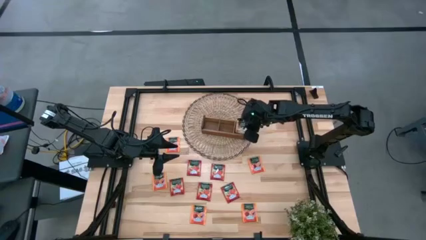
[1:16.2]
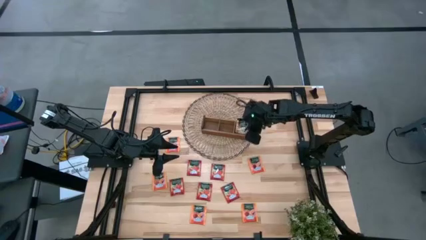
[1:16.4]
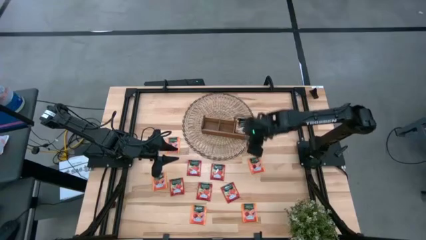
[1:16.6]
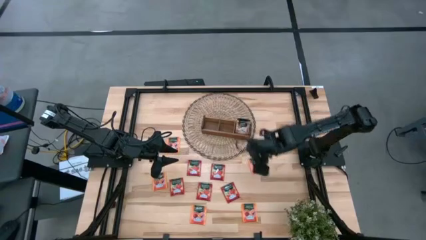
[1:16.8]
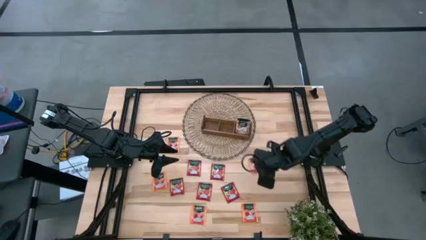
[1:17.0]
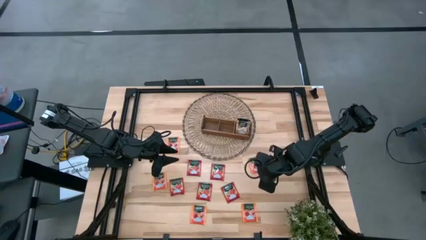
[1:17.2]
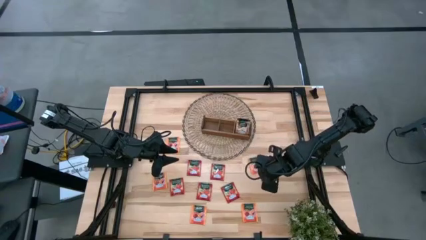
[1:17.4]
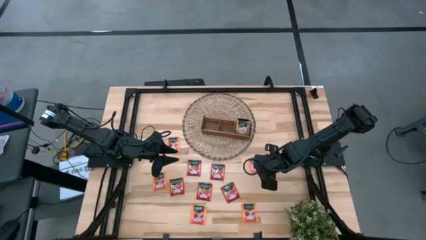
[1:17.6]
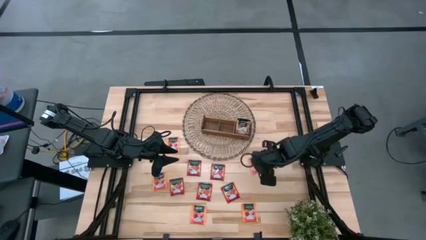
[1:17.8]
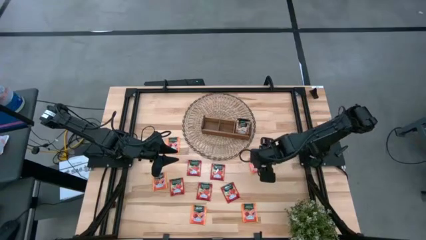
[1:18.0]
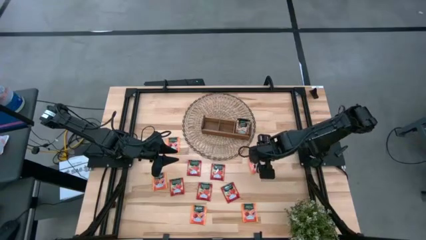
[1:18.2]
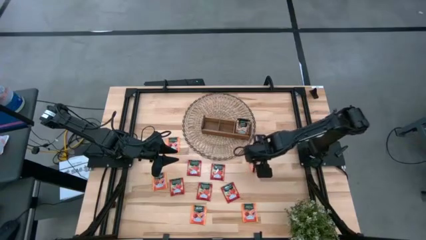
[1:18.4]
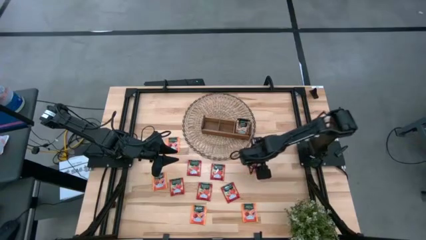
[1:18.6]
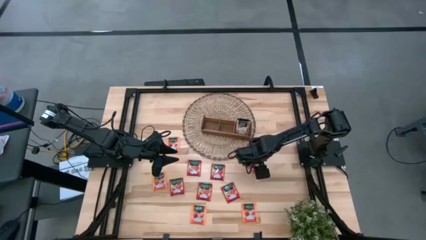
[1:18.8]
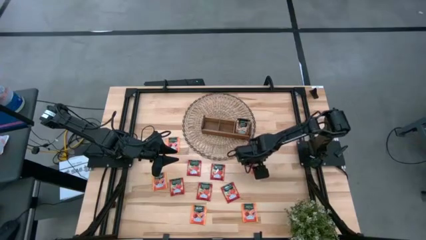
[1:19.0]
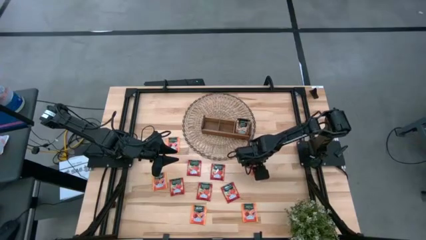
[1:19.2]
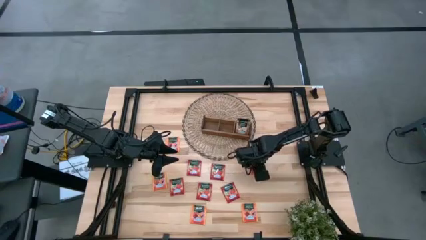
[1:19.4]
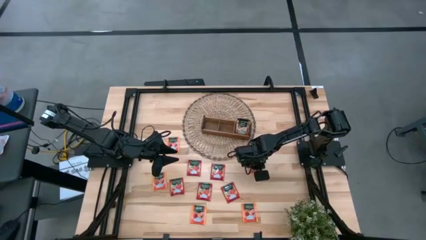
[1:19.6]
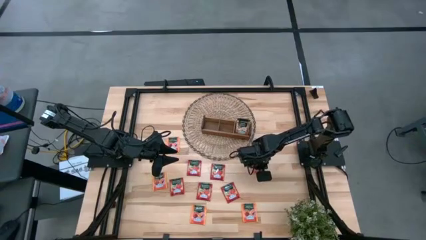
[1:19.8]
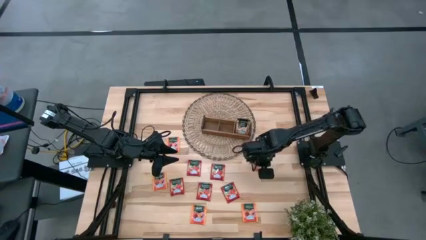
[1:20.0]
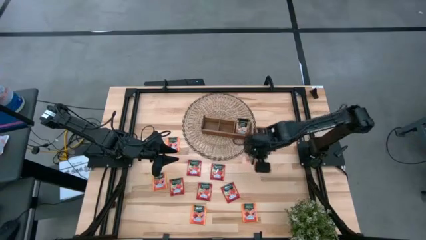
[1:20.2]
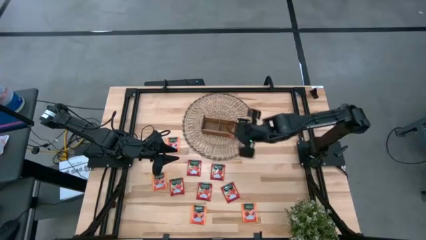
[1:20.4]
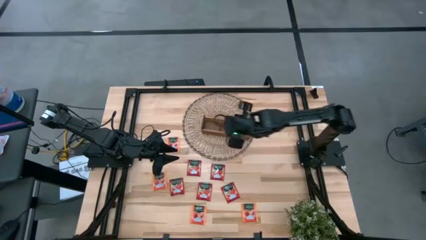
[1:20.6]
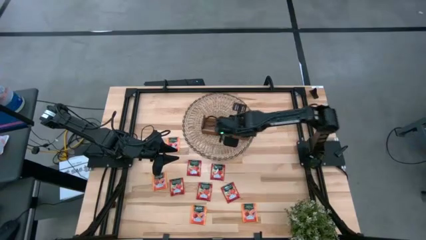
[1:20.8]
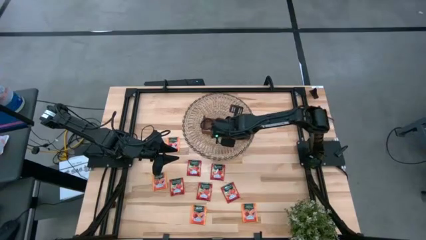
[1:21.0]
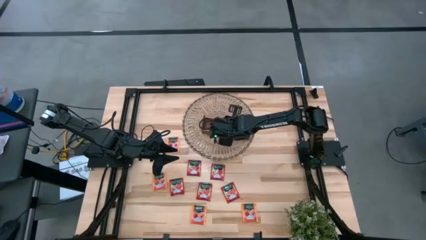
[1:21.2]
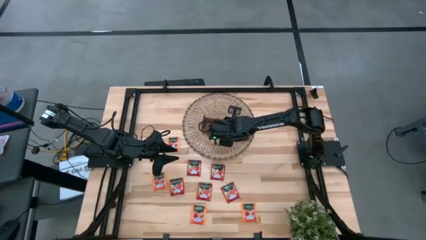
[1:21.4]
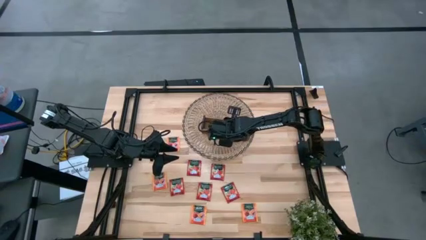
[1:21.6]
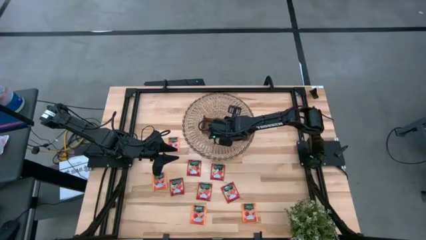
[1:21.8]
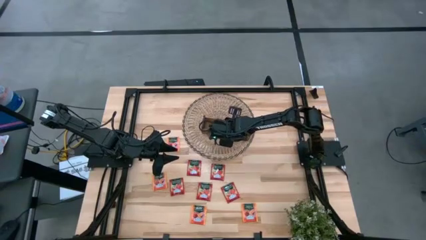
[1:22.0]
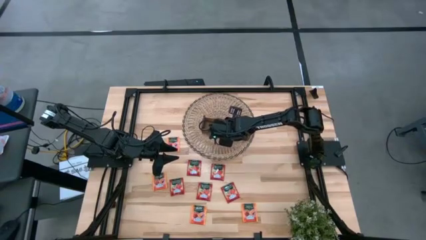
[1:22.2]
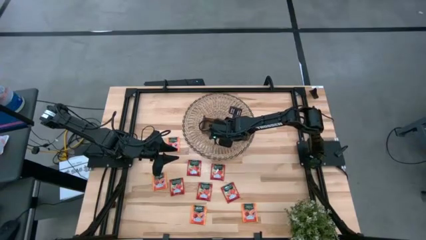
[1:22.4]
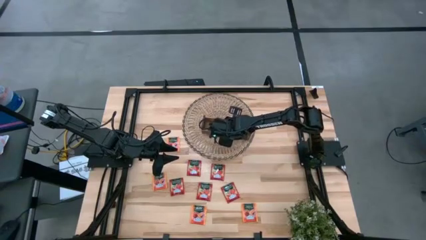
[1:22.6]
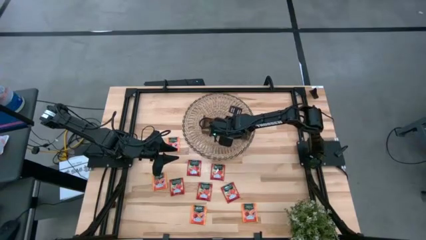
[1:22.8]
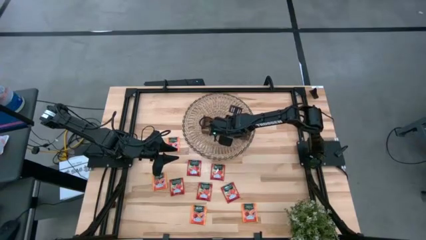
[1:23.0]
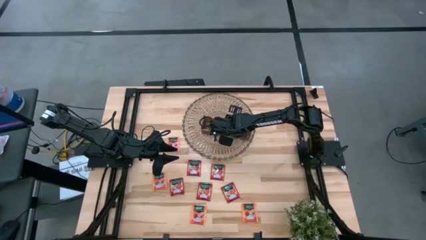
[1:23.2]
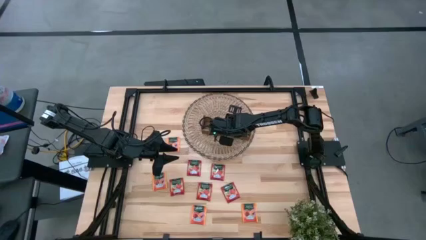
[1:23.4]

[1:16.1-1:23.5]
Task: Pick & Place Tea
Put the orange tea bag into the middle slot of the wooden organizer

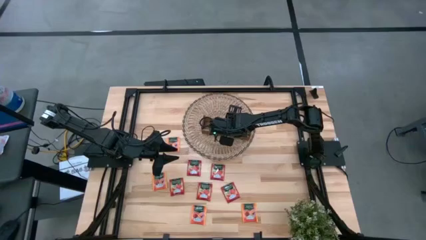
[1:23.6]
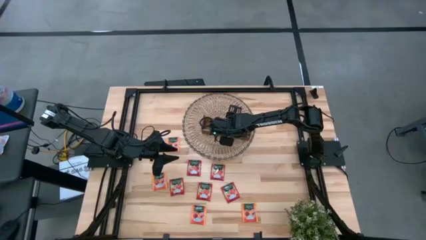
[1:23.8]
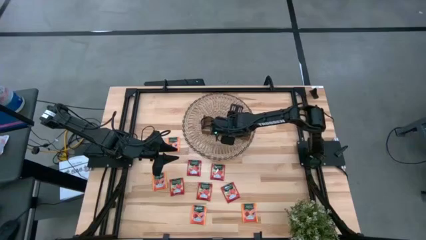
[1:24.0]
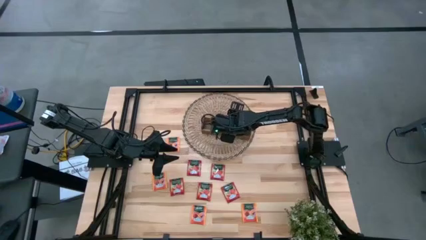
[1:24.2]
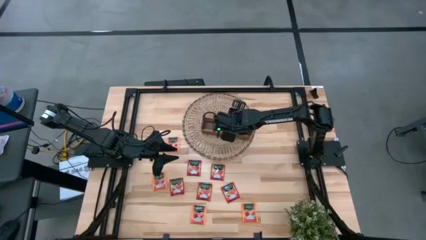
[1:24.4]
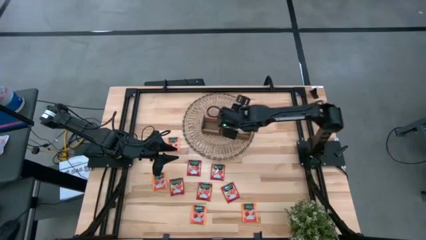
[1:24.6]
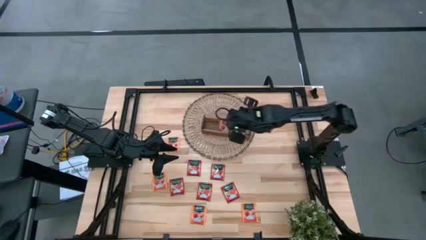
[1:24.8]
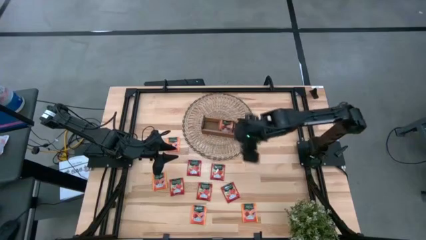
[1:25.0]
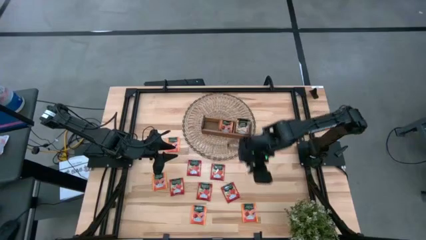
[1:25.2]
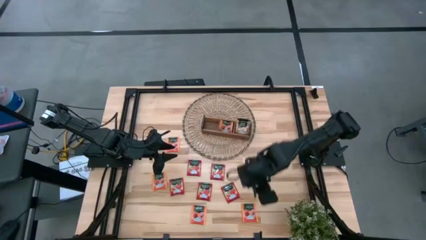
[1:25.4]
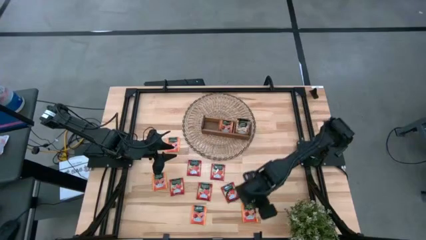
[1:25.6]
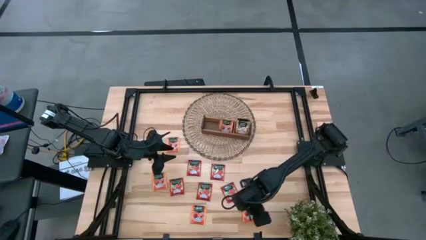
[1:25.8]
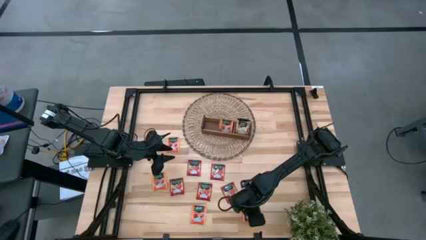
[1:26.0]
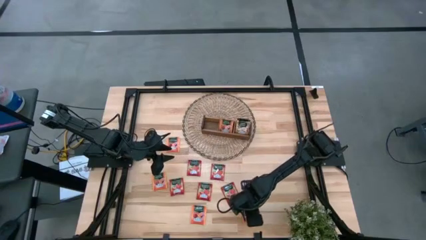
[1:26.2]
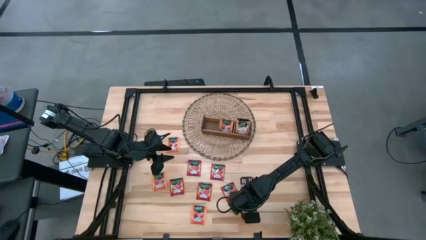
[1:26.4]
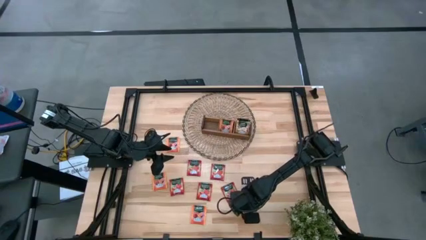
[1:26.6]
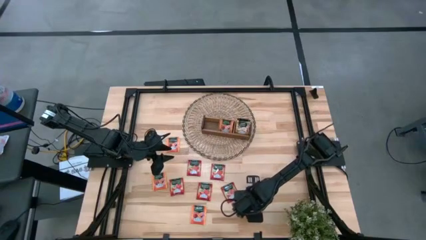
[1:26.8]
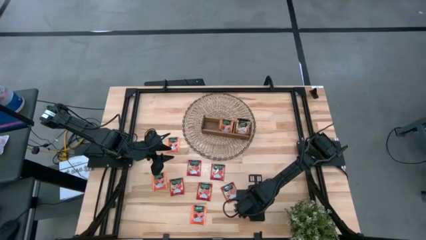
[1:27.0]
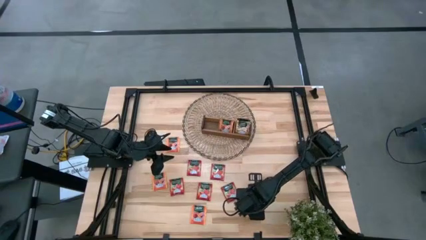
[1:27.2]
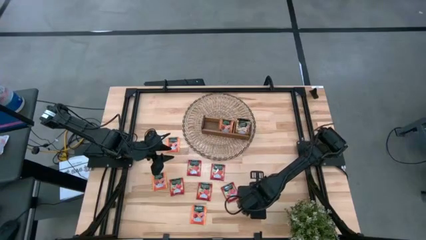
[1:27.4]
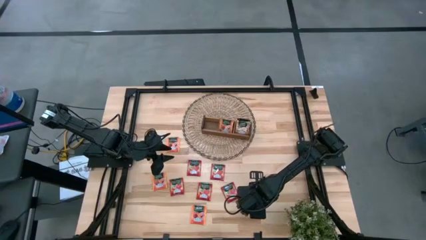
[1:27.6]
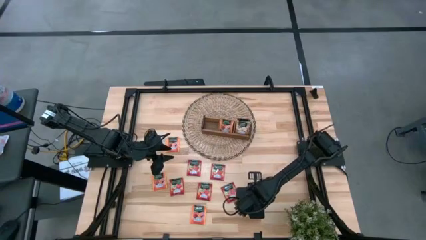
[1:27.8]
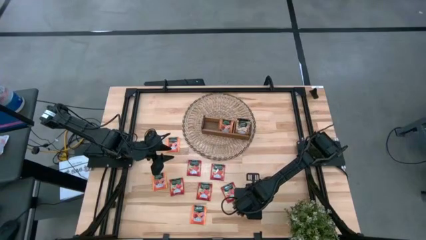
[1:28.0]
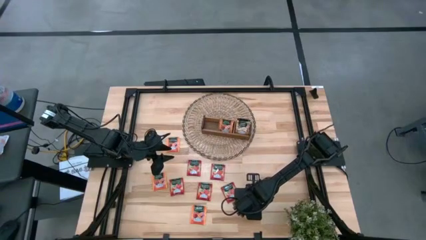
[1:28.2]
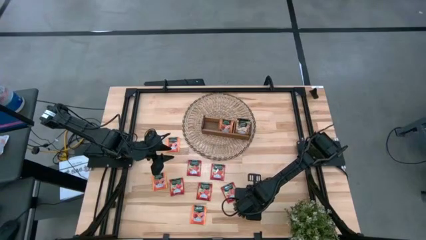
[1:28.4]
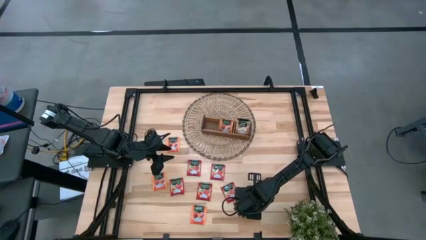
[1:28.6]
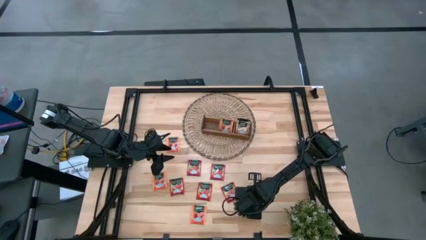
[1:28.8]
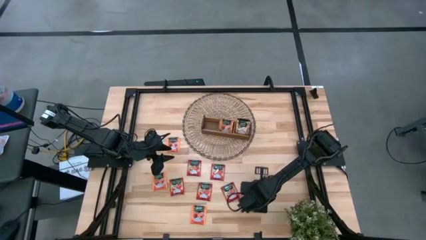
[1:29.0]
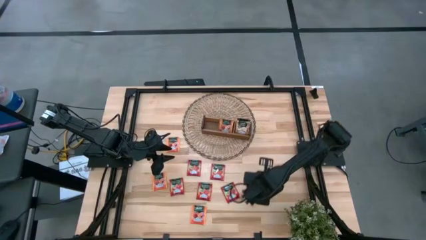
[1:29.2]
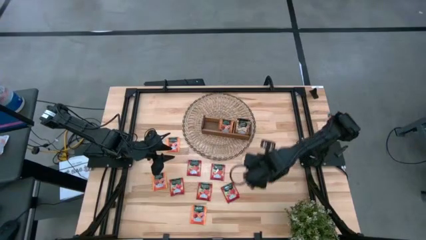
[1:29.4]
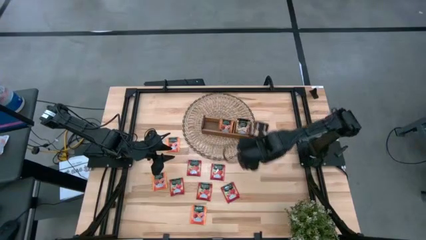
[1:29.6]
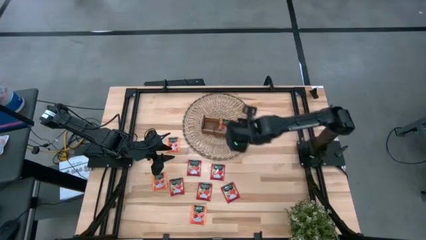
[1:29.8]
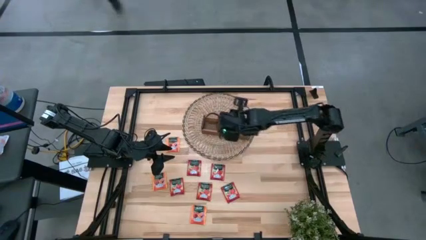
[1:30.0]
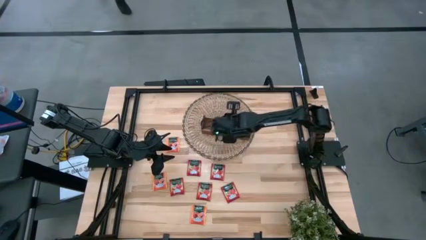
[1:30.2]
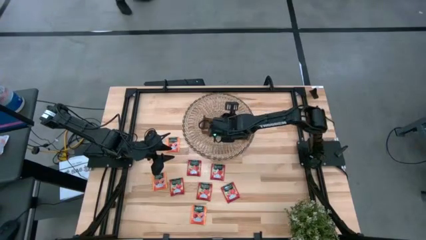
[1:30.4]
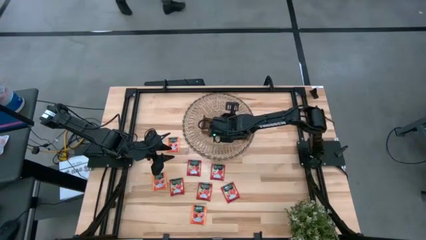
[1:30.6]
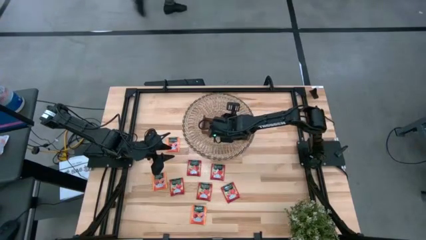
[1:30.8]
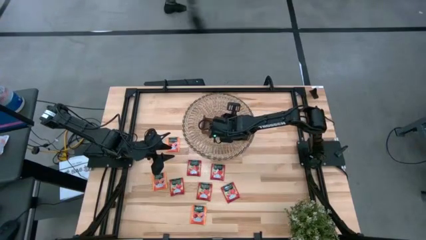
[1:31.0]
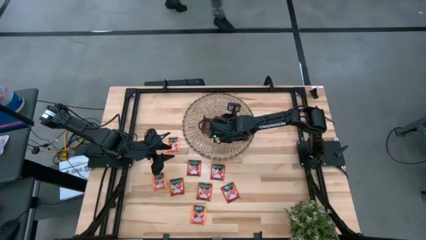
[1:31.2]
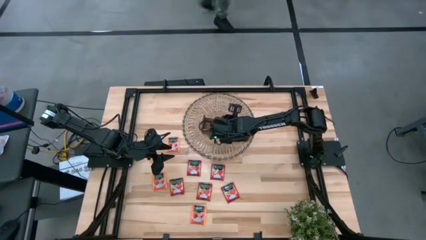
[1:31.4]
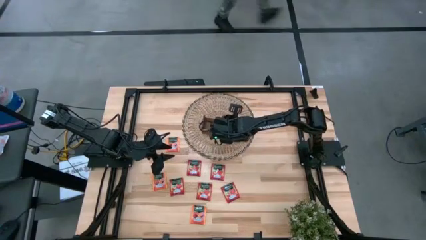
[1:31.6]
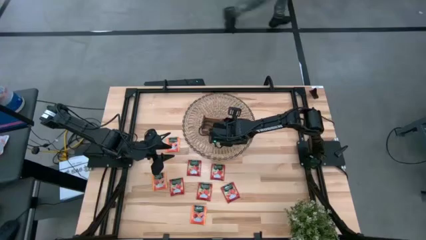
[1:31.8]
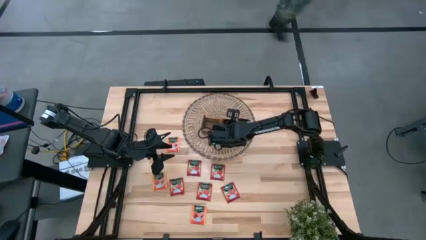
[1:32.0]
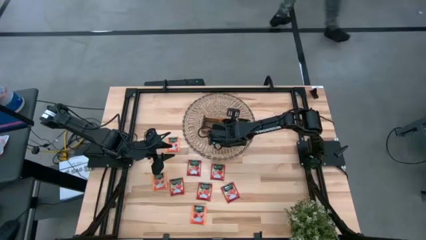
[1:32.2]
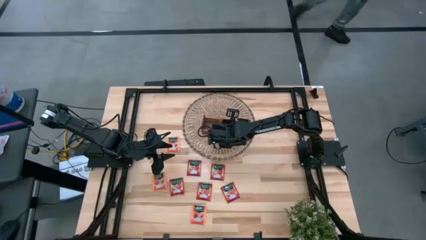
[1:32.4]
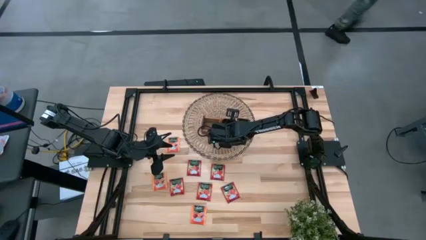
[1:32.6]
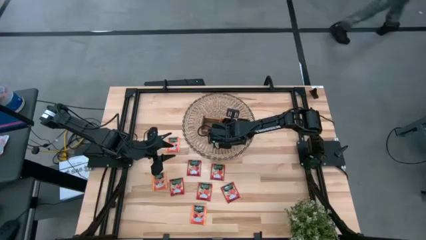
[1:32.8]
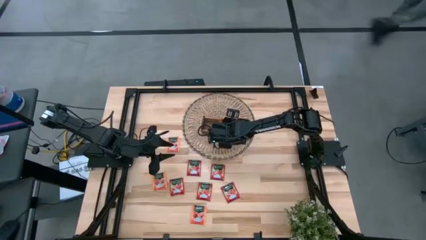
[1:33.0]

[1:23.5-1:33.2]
Put the orange tea bag into the middle slot of the wooden organizer
